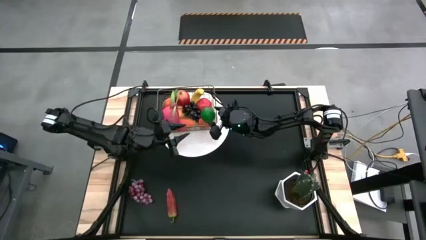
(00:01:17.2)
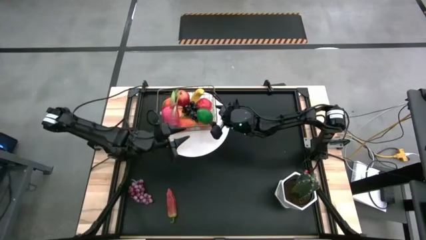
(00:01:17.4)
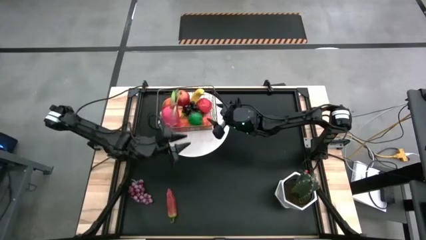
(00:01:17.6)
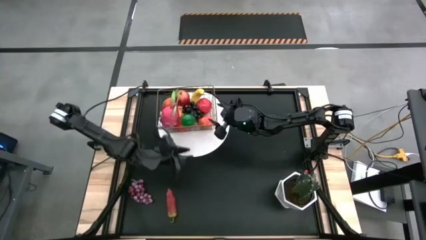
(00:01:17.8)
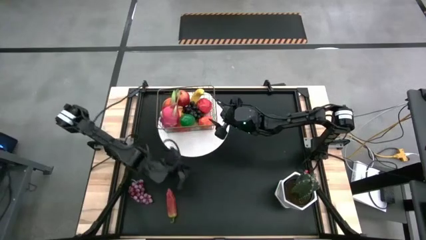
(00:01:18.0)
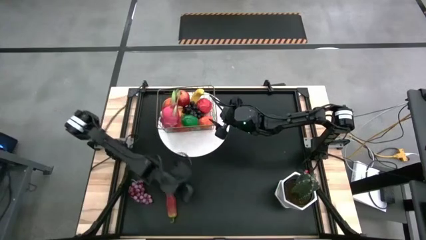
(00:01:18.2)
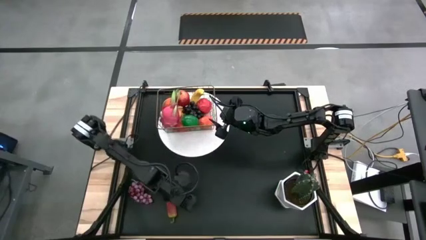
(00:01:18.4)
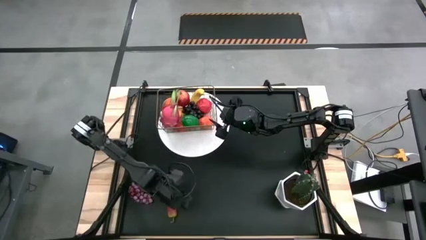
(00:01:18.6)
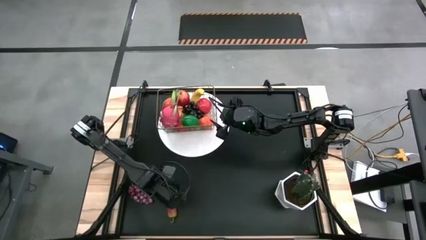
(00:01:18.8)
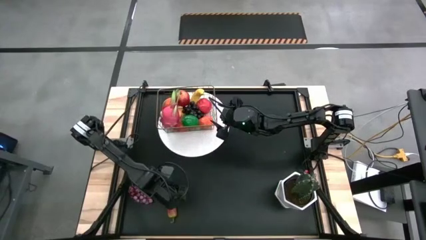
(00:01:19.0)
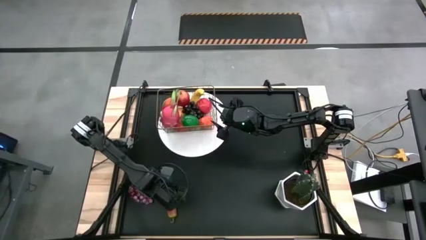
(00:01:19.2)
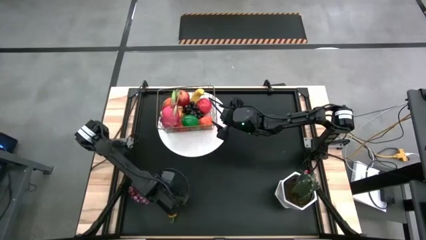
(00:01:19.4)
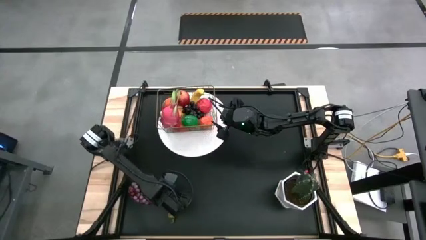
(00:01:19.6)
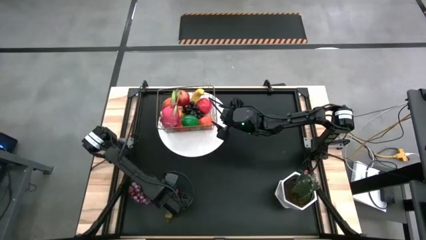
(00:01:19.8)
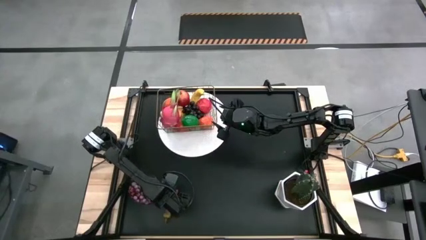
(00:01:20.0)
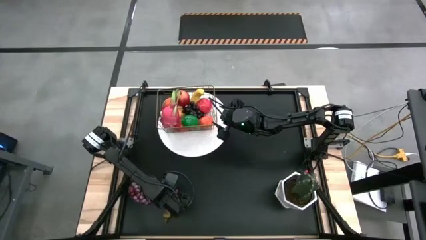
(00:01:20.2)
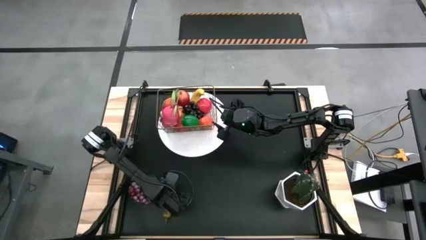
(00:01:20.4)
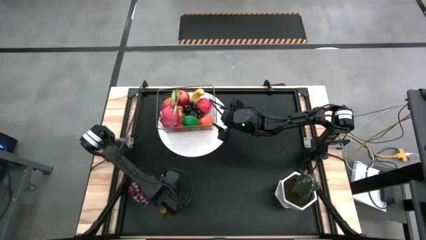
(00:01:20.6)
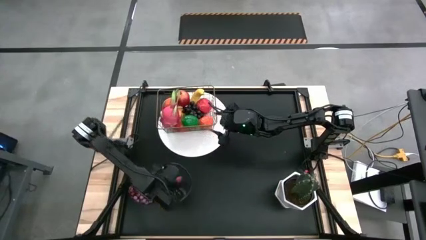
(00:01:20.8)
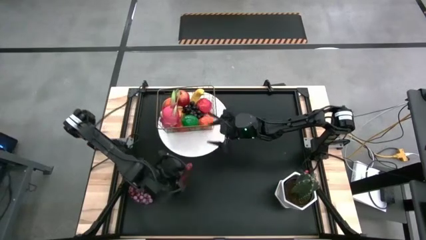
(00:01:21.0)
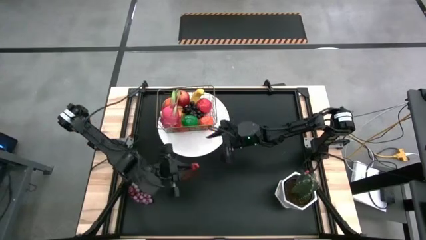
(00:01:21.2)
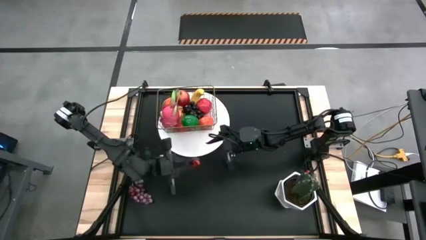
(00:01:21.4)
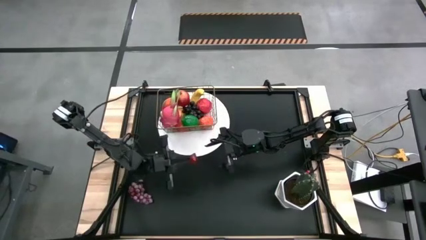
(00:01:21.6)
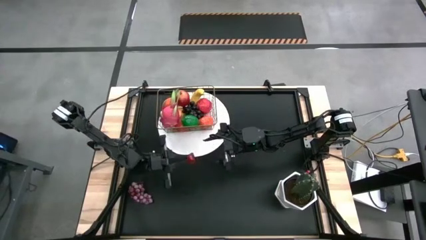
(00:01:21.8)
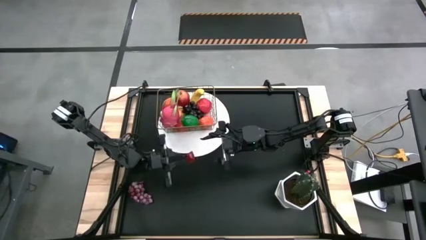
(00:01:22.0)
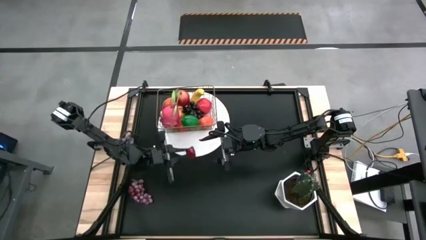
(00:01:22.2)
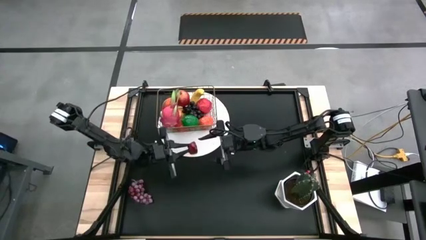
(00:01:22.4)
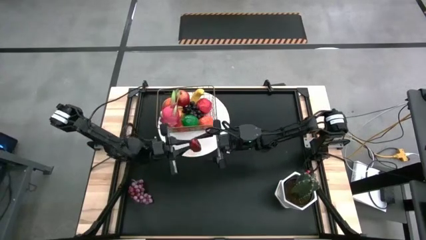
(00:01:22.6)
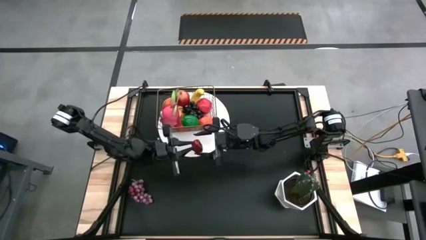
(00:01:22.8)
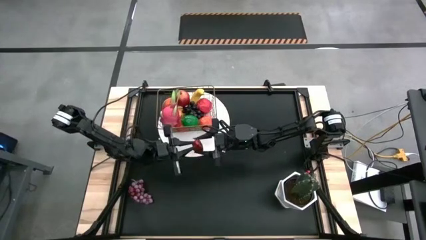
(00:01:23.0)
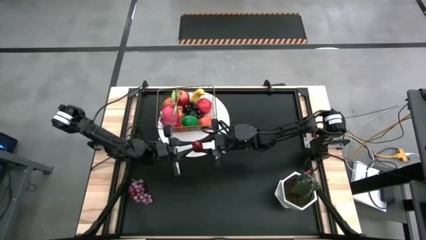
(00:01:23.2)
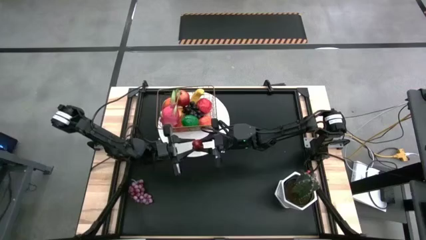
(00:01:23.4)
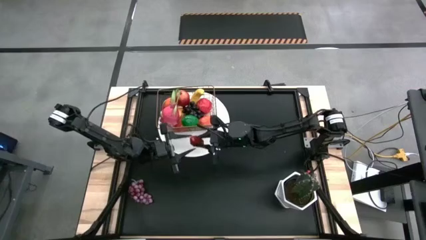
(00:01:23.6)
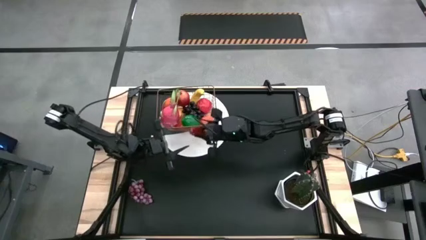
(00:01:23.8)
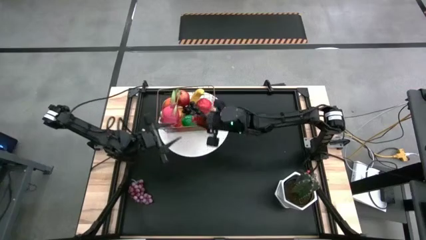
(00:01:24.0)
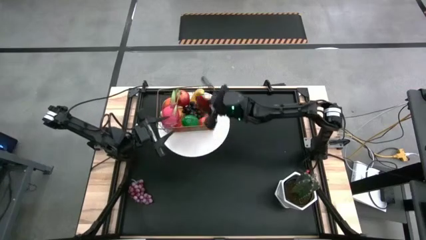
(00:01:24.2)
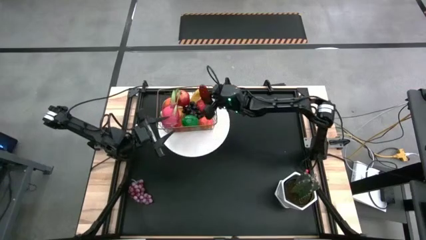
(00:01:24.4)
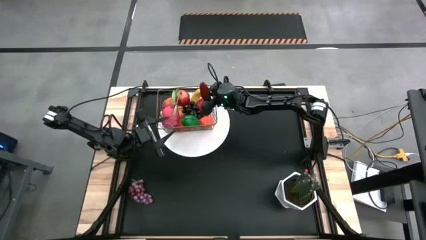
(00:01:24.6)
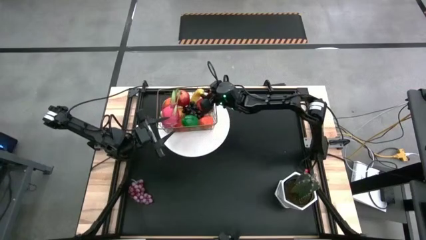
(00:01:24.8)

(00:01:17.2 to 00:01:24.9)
Task: Build produce basket
Put the red chili pepper into the wire basket

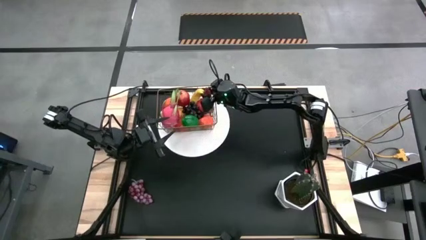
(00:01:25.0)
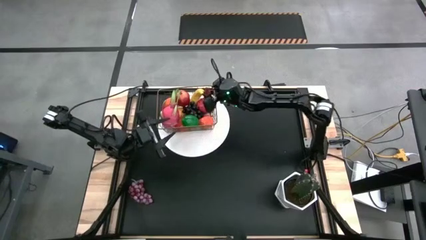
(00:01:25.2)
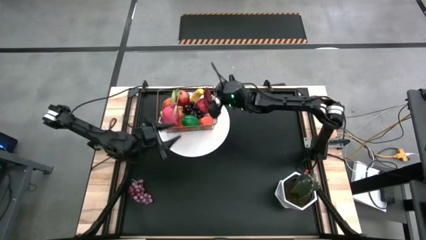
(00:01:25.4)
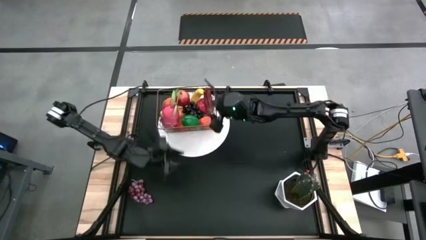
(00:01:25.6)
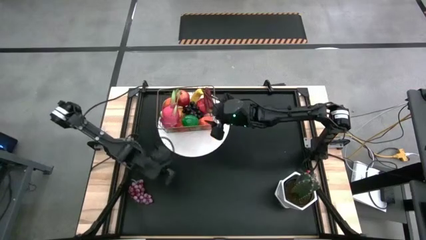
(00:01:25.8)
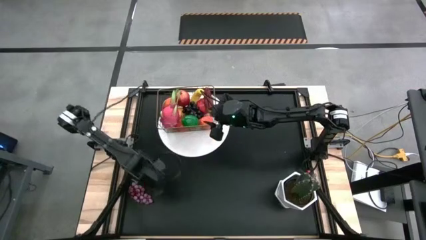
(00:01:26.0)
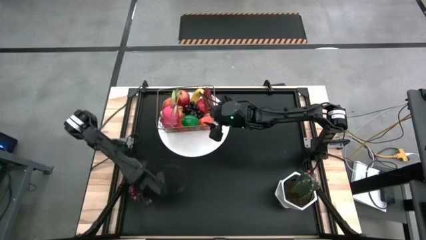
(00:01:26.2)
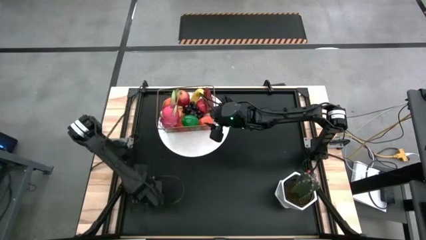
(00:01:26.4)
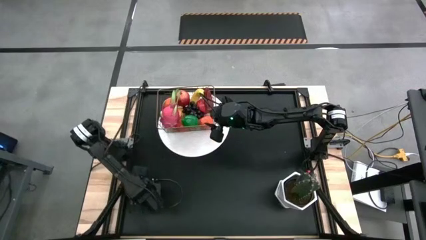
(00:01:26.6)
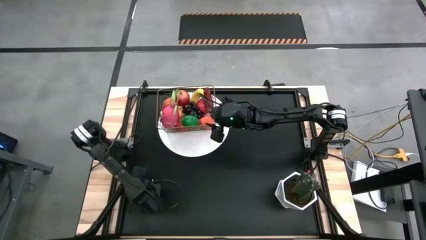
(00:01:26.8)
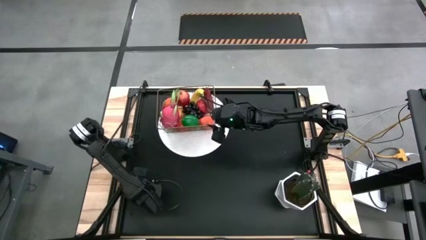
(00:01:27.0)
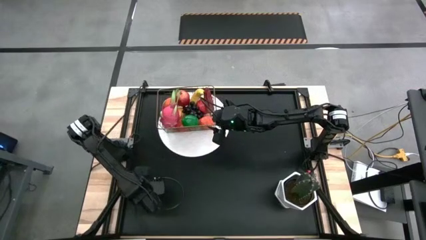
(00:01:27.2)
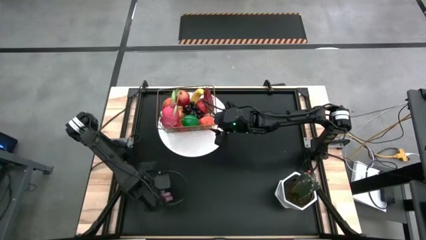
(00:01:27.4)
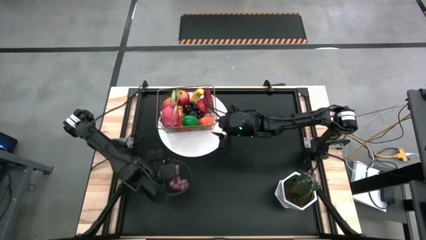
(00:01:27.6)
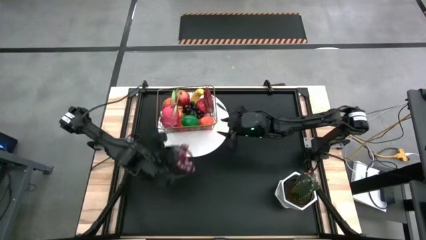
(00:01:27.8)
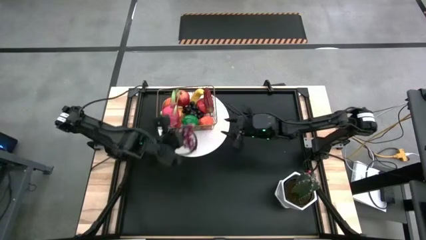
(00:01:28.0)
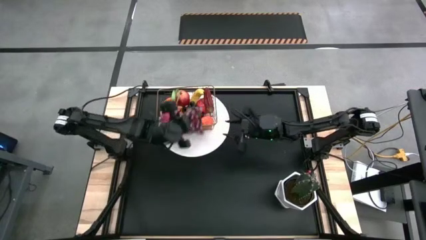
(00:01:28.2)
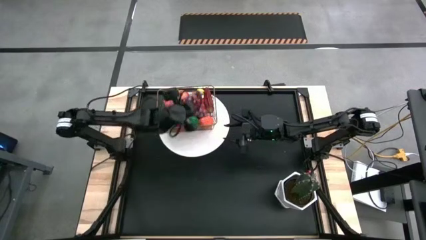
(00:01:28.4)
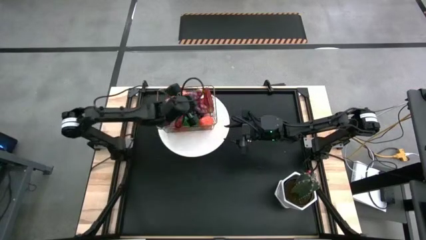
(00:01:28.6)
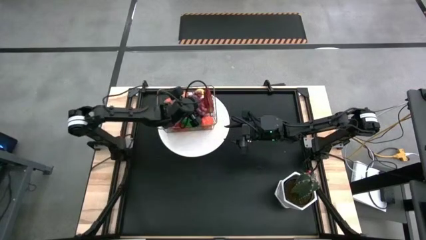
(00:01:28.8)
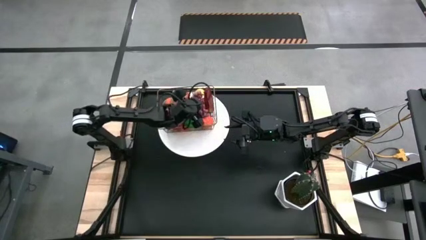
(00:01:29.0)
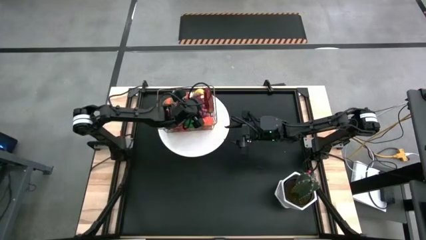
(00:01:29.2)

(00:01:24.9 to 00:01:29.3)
Put the red grapes into the wire basket

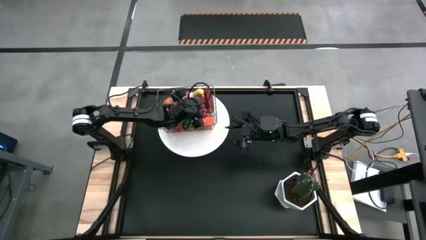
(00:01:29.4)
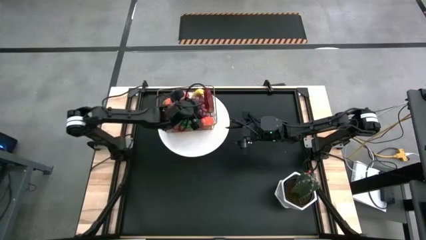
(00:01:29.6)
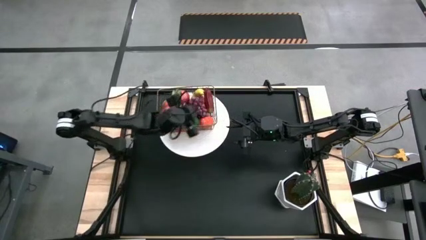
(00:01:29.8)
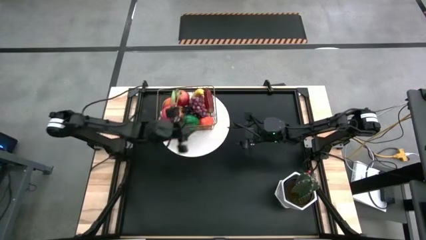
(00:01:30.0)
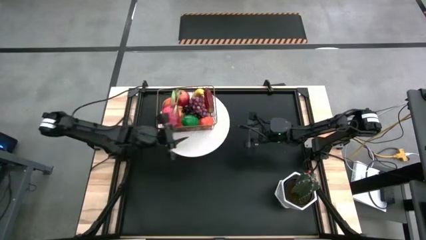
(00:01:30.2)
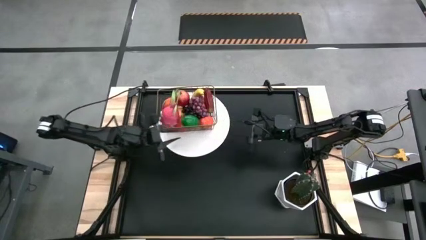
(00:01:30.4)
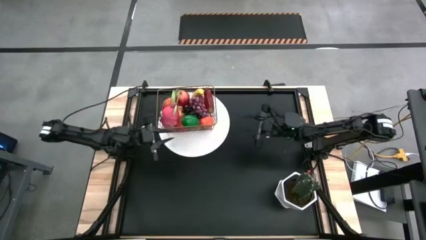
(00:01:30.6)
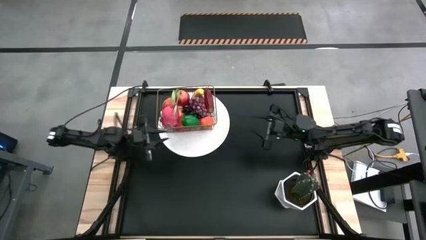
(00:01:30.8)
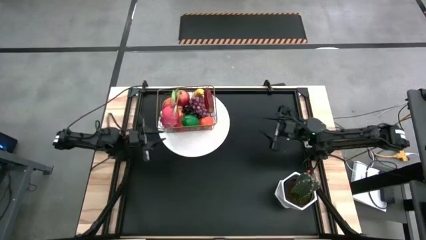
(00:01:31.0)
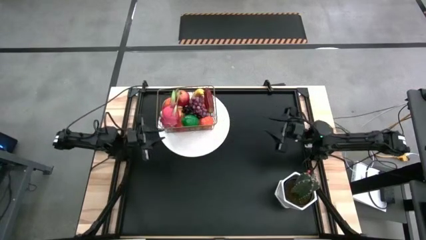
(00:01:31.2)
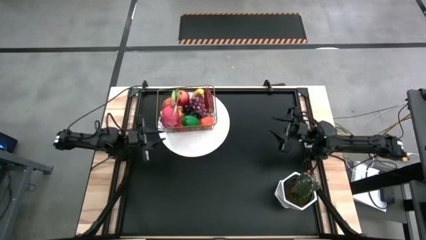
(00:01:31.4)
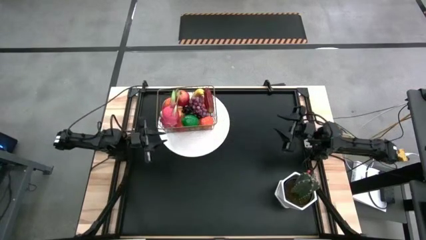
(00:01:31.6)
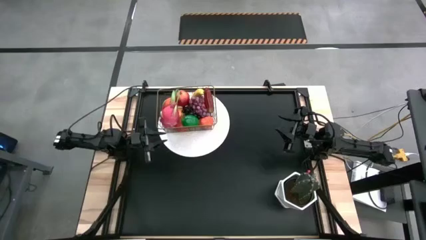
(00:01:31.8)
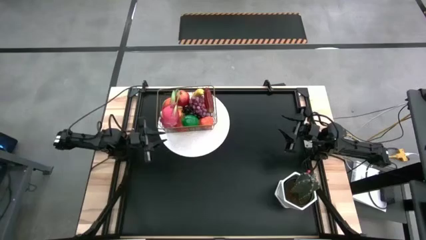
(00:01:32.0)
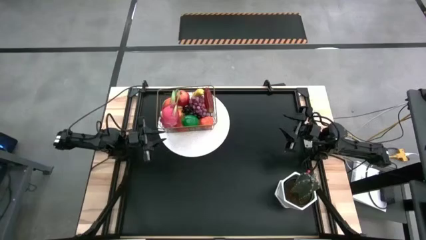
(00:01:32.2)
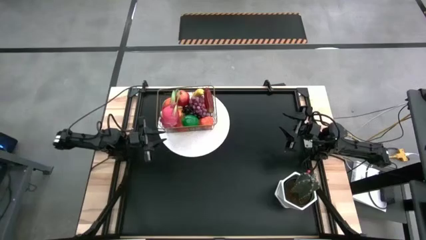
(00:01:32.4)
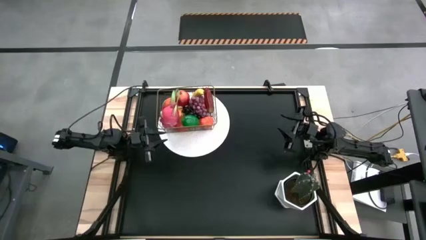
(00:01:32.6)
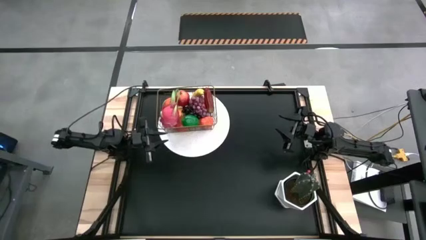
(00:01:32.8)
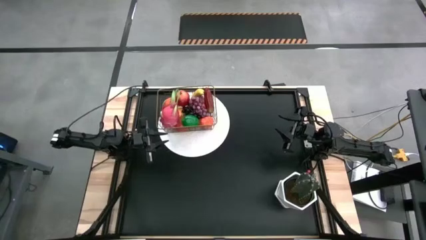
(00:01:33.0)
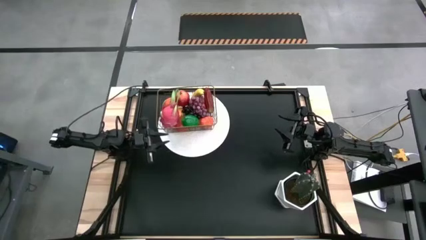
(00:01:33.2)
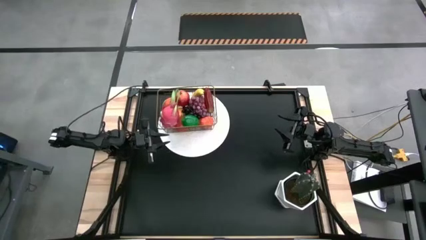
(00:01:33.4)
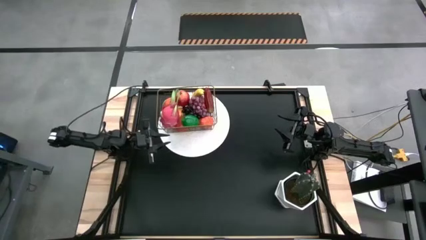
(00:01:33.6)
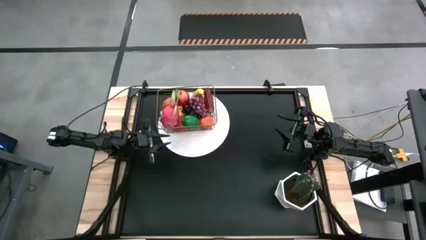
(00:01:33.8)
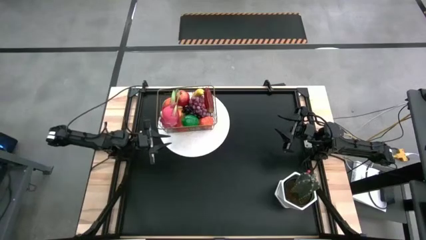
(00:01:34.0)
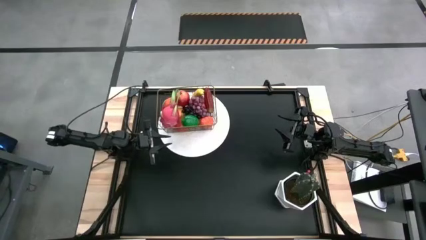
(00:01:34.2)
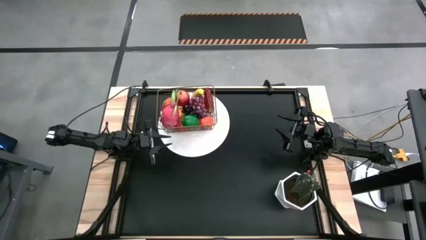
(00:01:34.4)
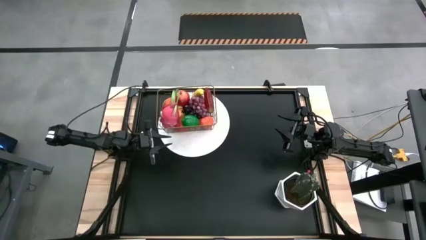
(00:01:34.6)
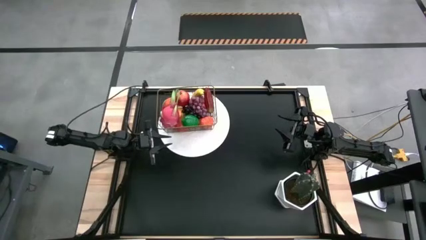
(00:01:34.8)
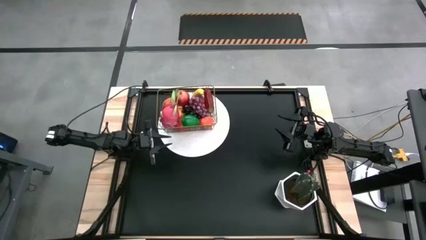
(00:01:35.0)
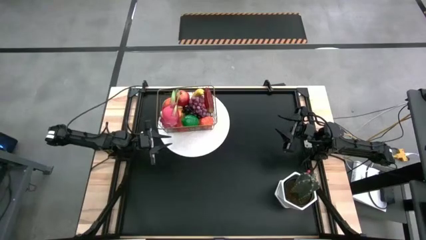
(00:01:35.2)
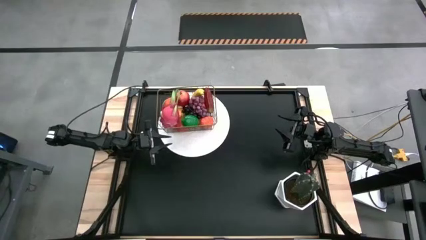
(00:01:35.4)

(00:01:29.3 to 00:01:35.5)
Return to Home Position
